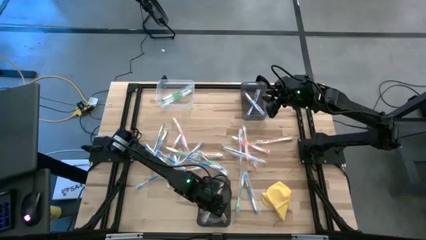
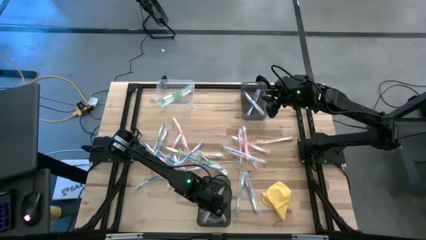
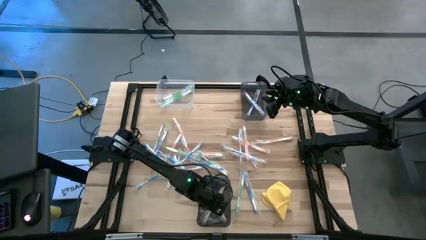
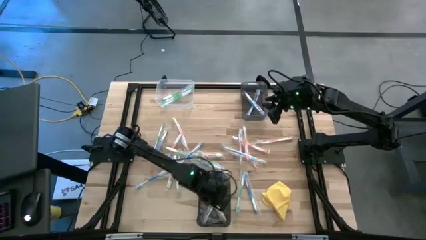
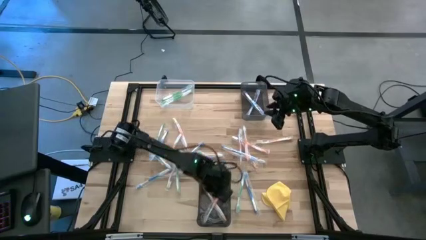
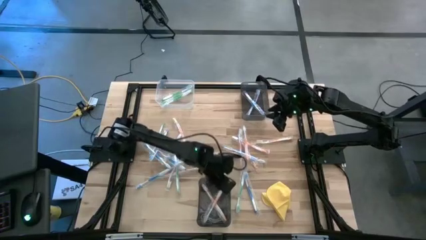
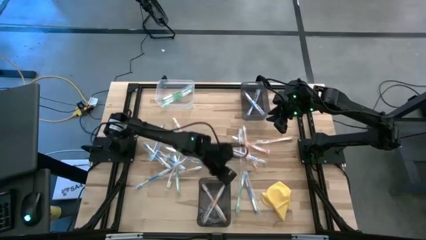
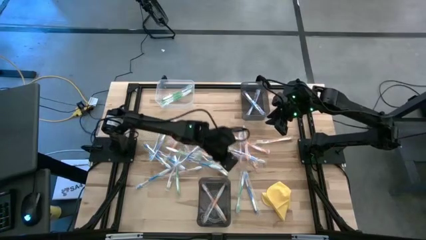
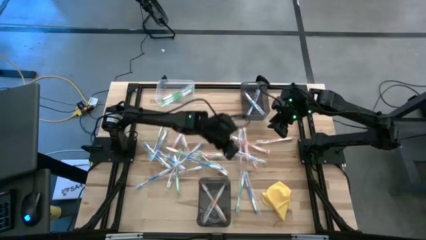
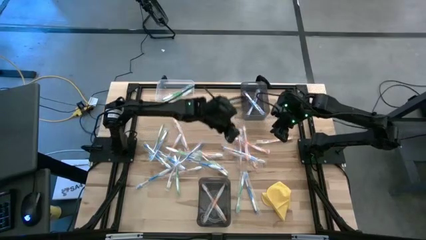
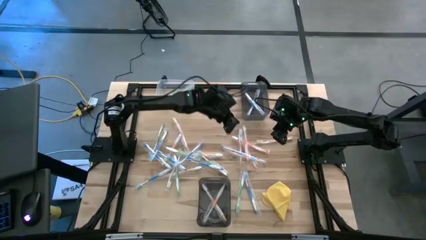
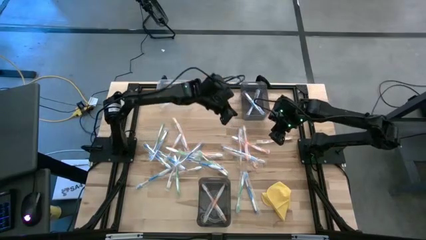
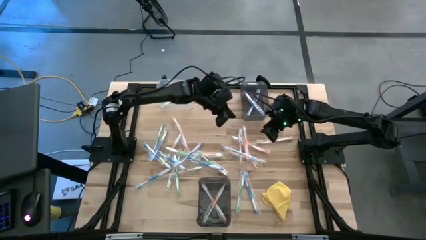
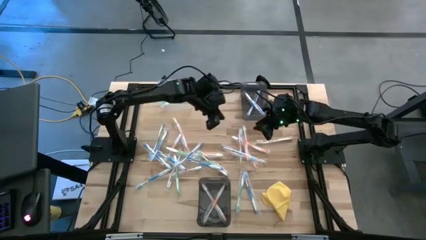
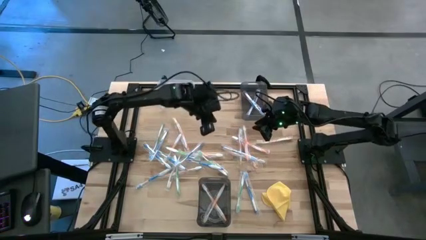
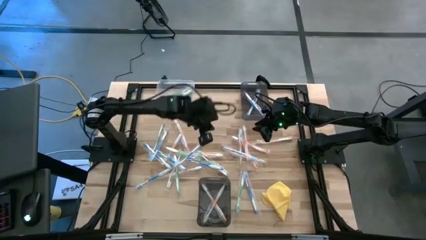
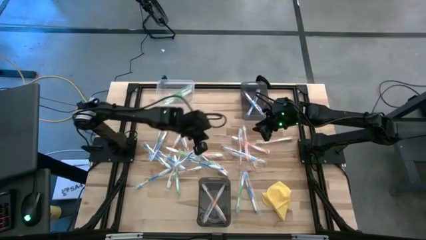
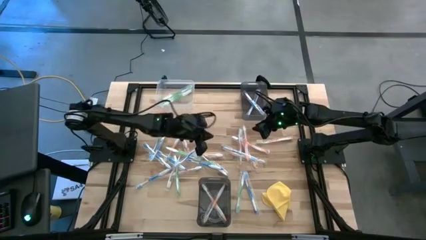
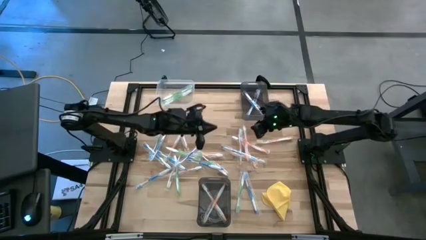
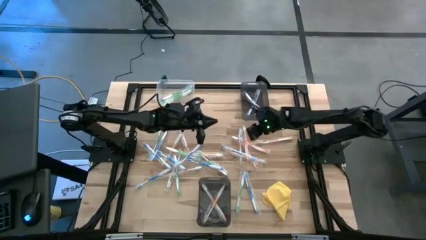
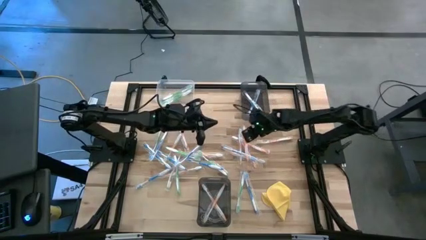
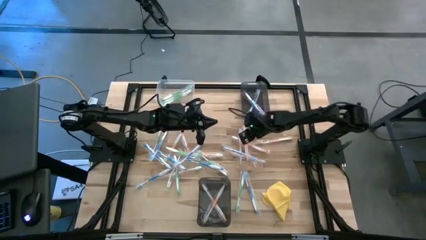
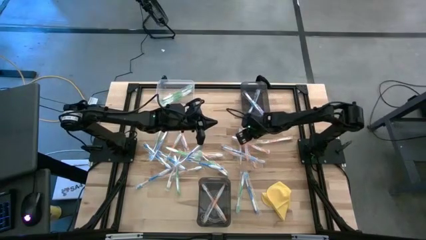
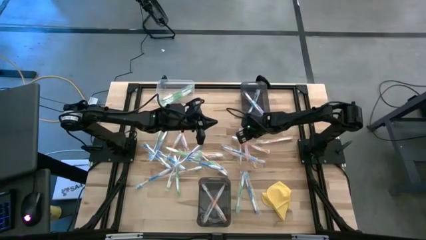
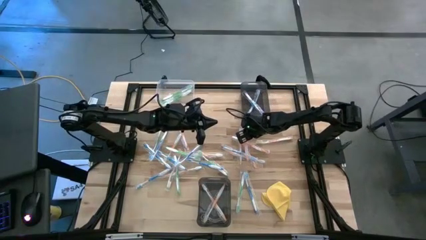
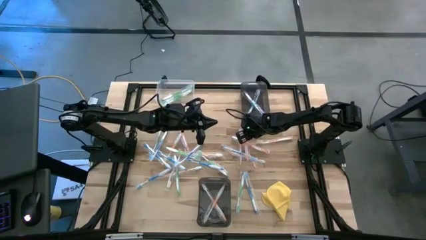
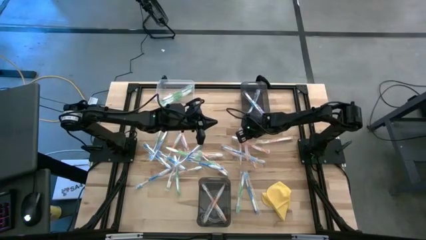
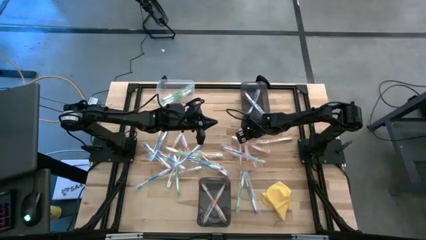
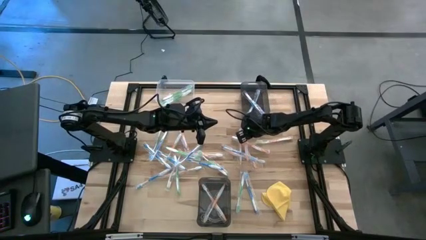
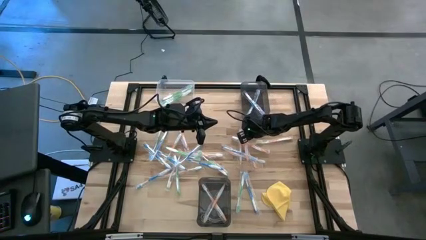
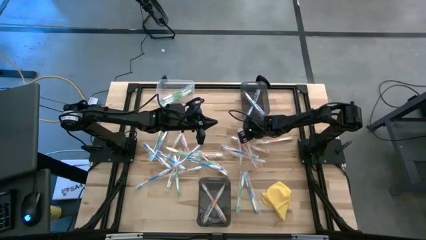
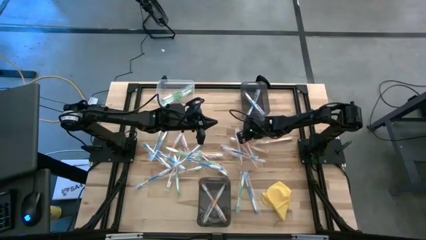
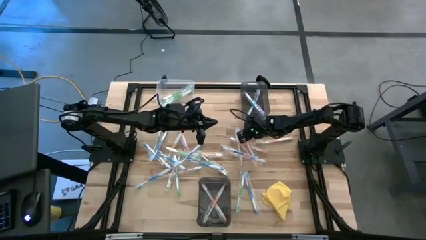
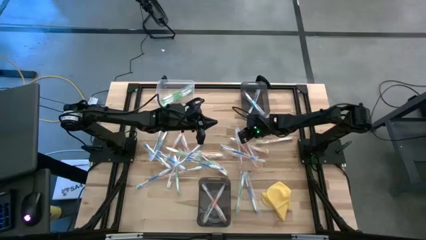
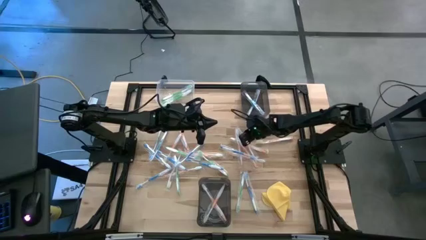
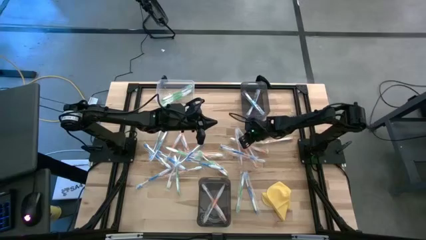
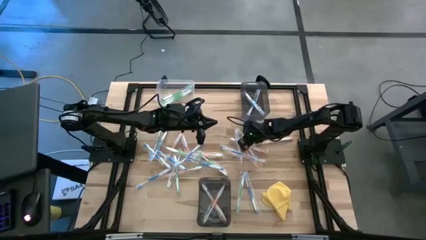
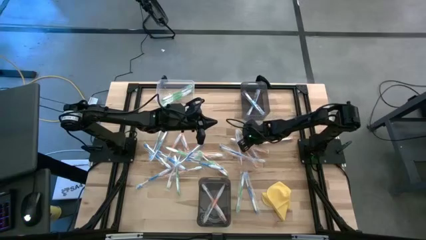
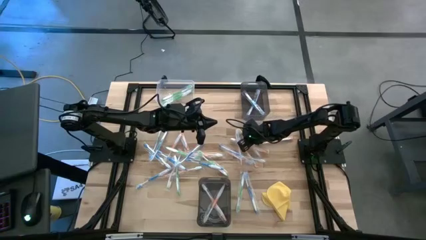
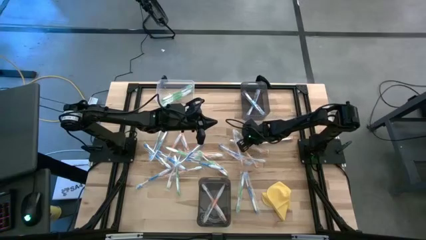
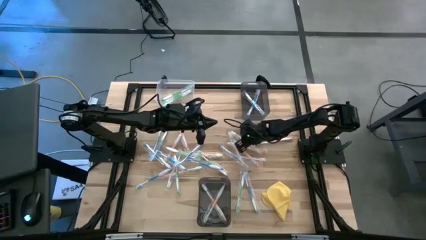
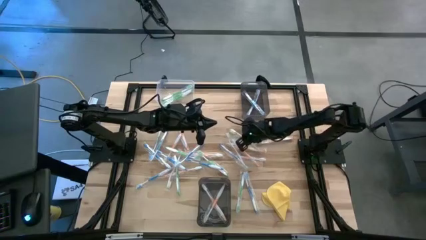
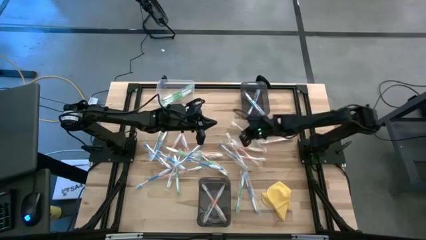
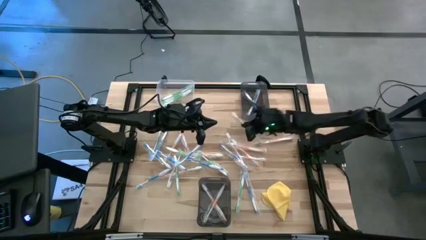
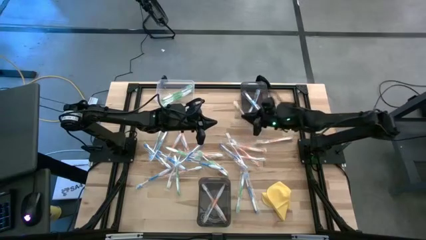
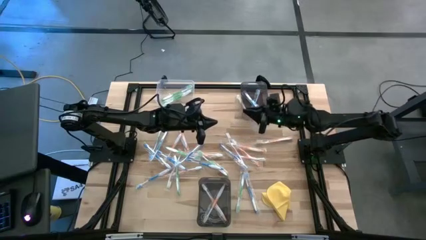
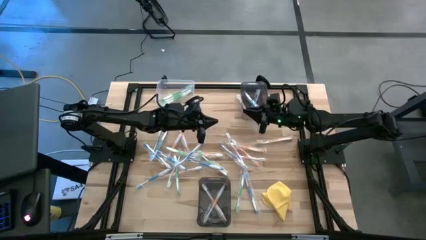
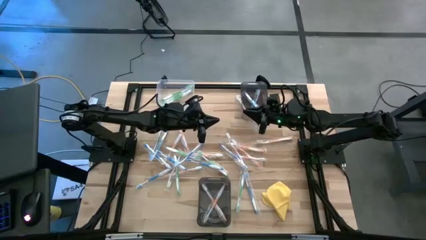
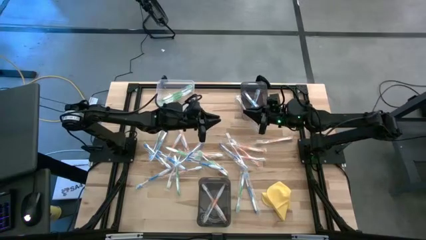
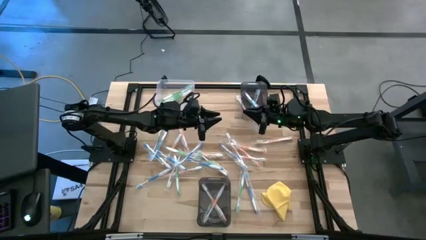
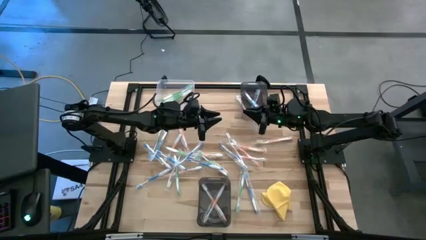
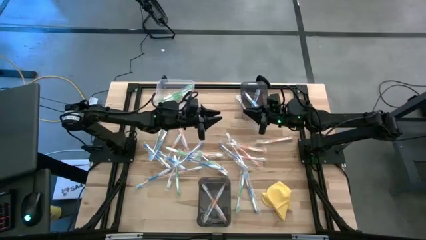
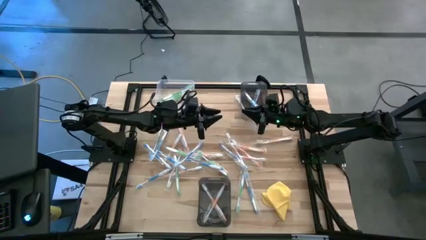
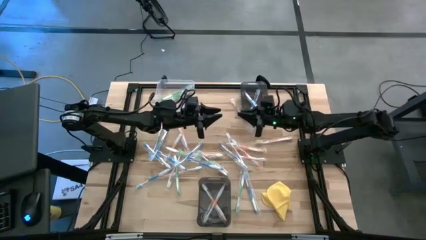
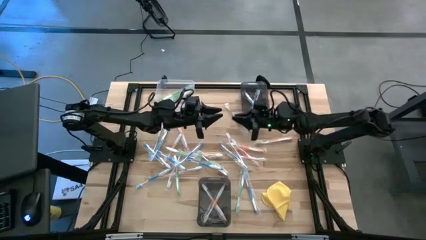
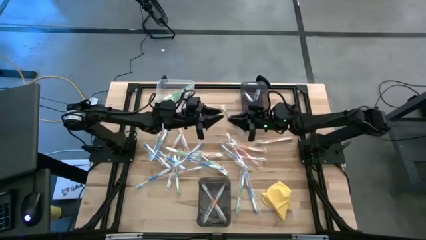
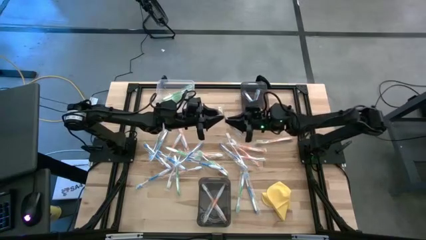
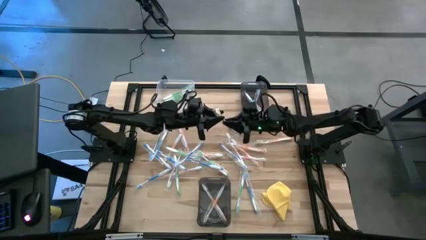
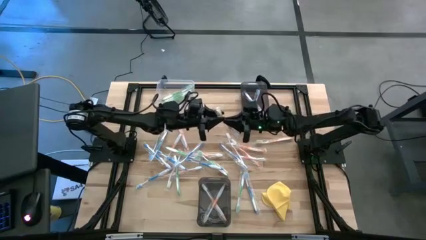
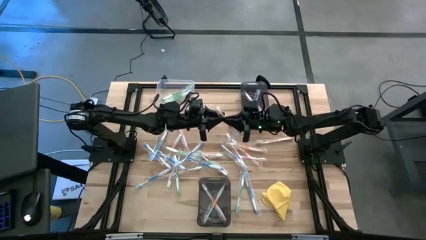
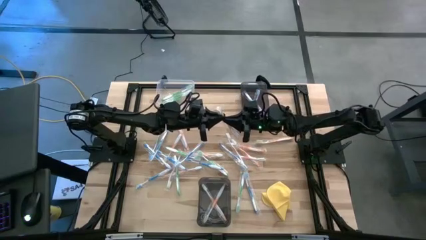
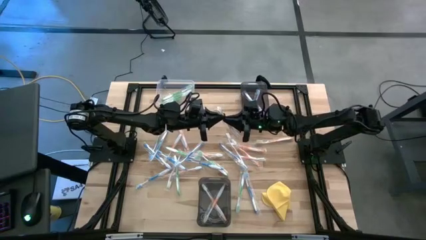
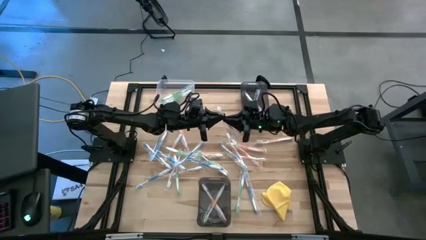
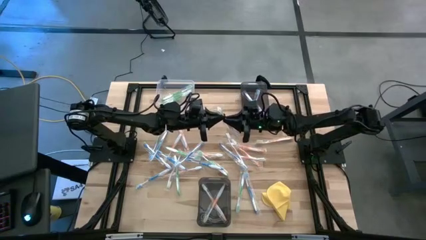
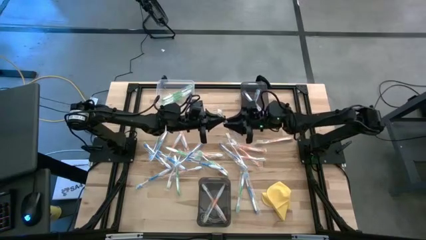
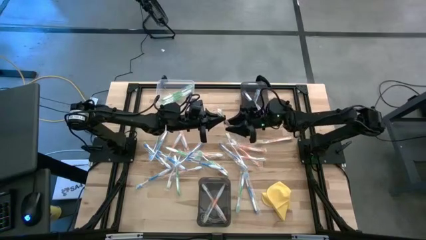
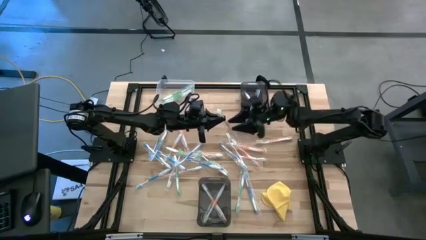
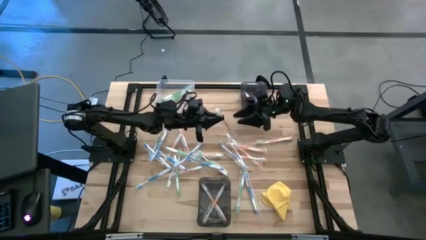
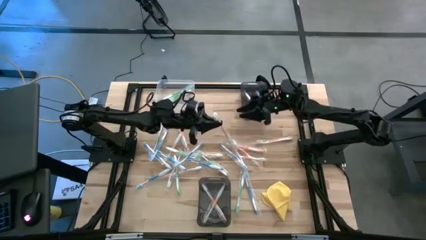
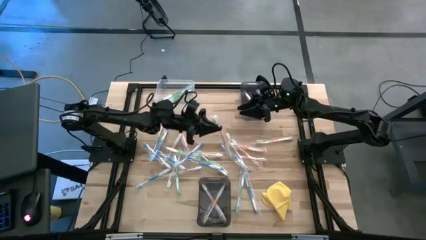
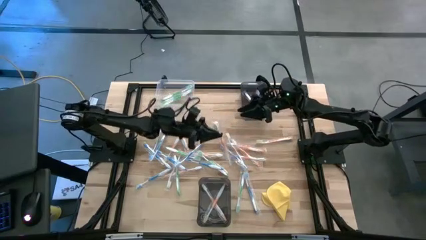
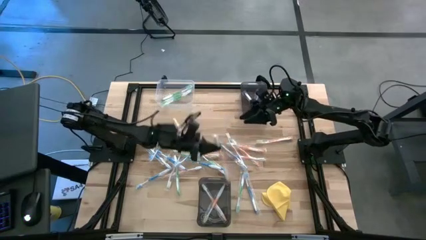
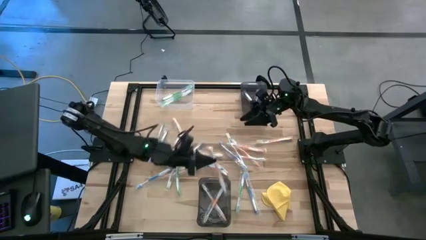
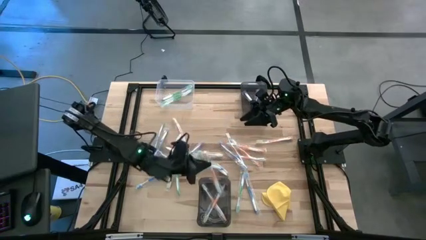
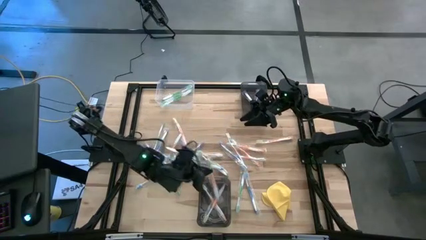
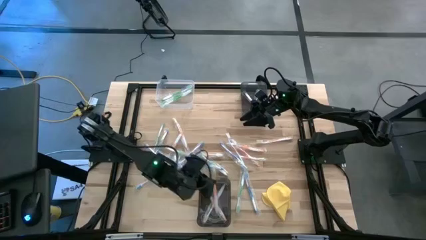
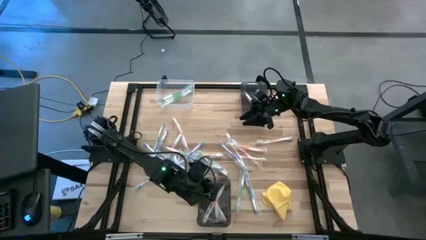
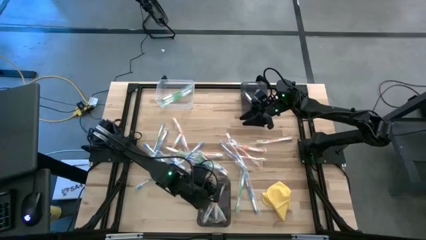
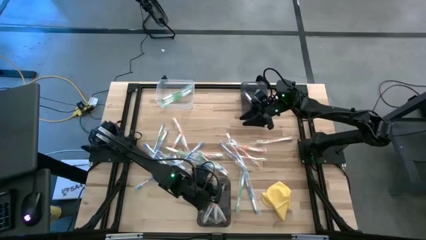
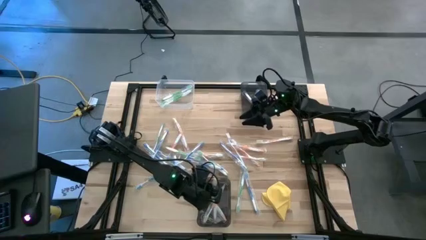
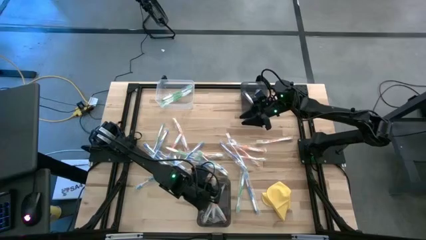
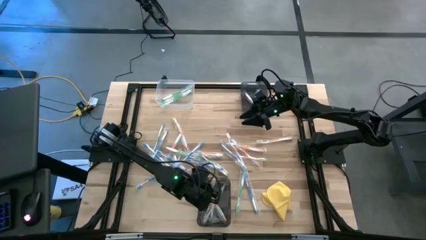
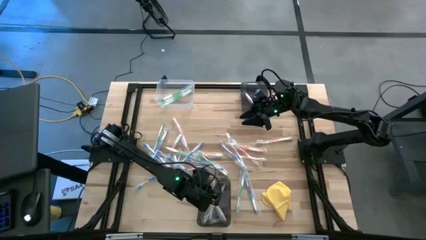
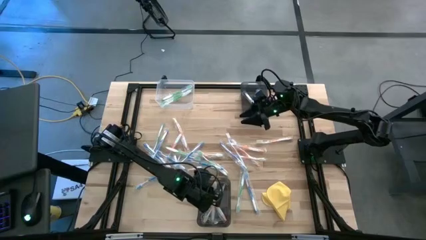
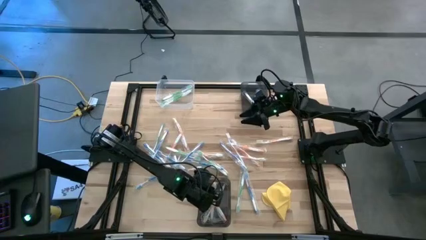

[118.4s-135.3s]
Task: Pick & Place Toothbrushes
Put the orange toothbrush into the bottom black bin
